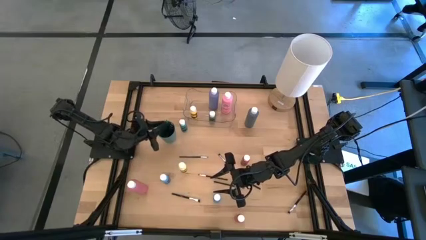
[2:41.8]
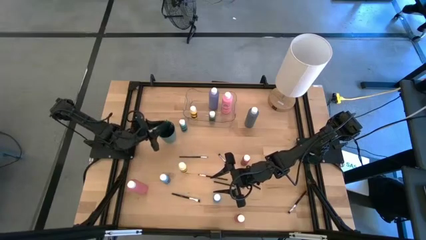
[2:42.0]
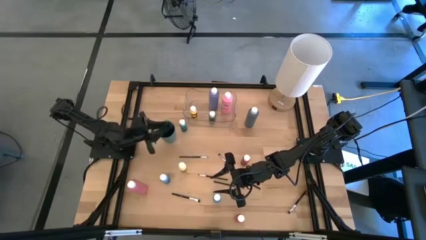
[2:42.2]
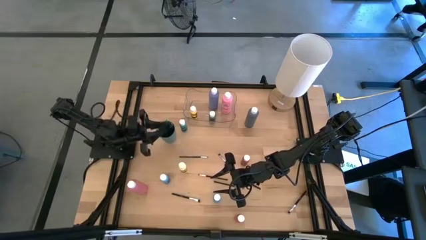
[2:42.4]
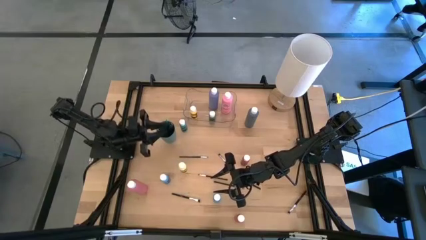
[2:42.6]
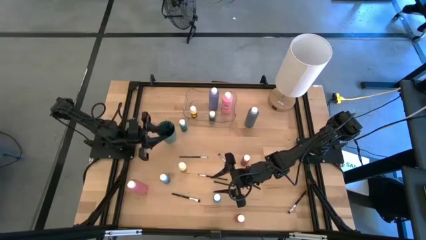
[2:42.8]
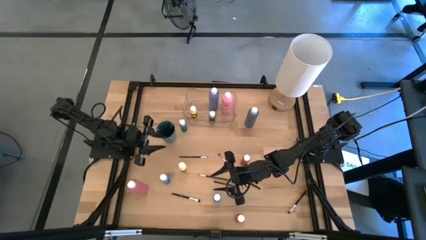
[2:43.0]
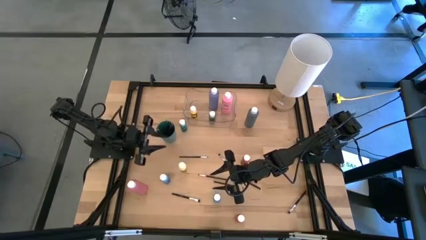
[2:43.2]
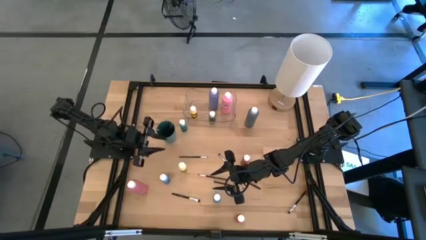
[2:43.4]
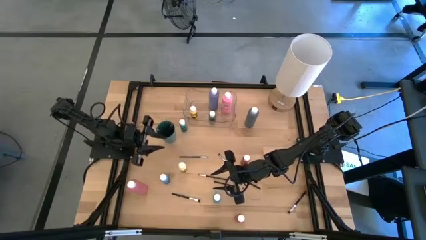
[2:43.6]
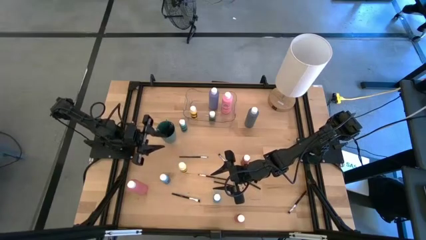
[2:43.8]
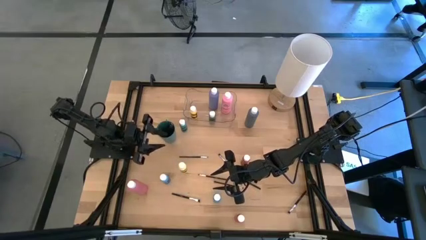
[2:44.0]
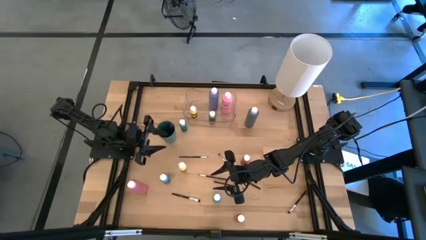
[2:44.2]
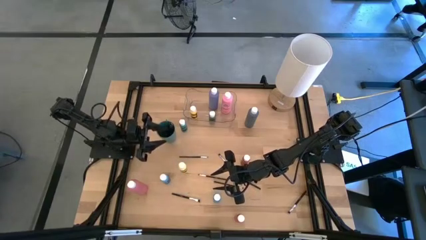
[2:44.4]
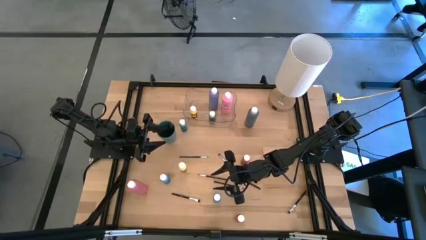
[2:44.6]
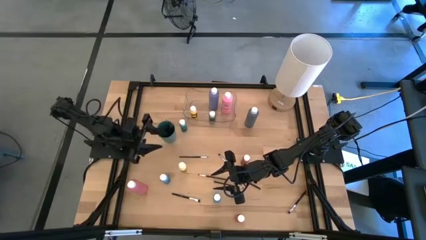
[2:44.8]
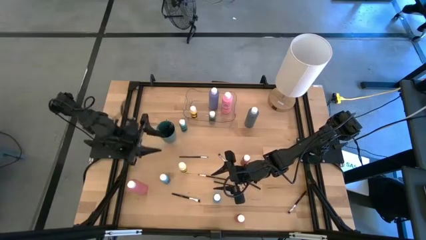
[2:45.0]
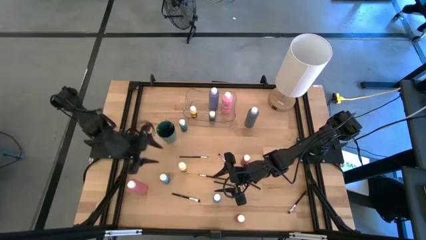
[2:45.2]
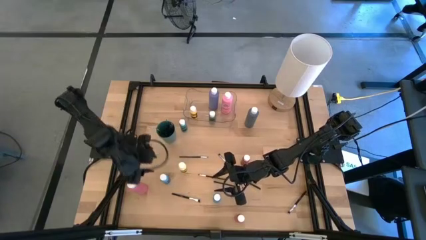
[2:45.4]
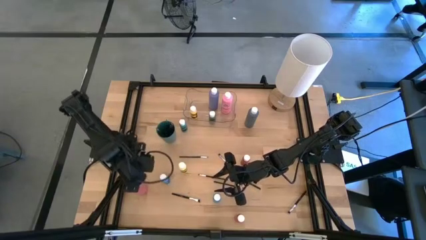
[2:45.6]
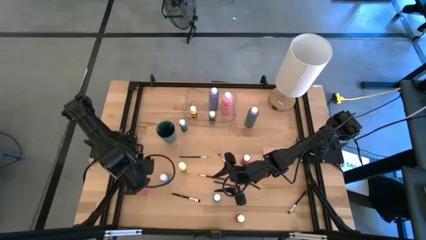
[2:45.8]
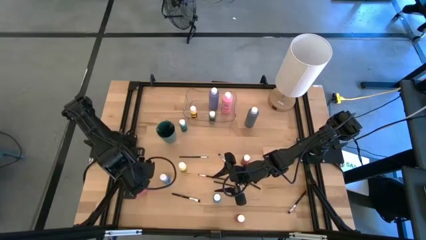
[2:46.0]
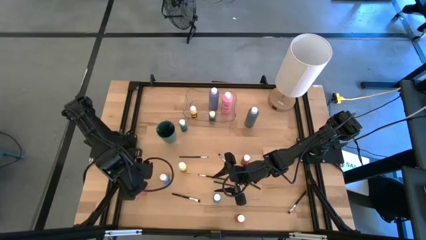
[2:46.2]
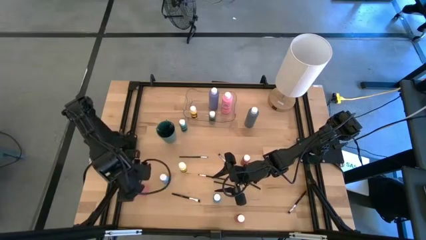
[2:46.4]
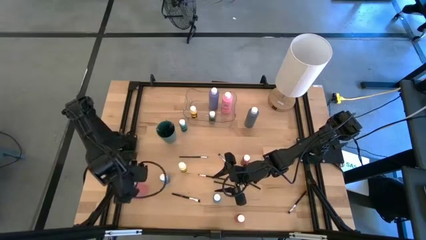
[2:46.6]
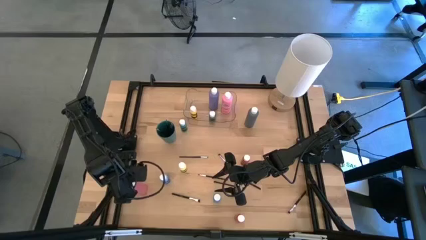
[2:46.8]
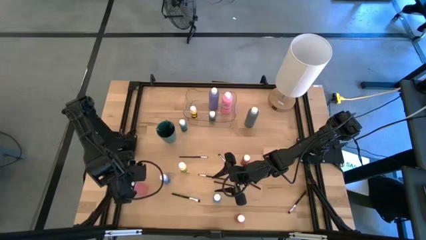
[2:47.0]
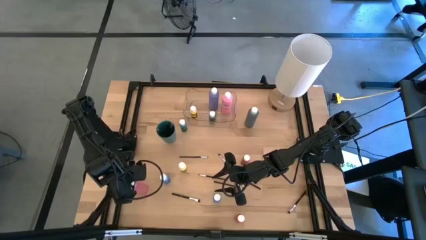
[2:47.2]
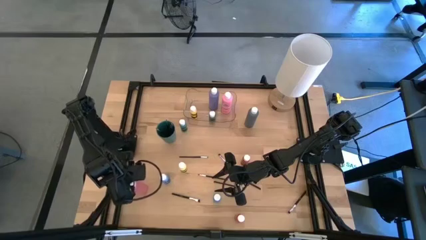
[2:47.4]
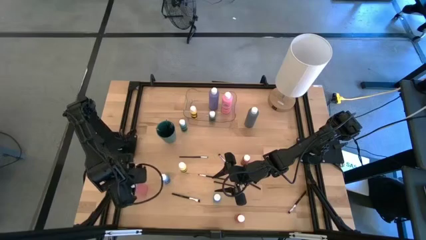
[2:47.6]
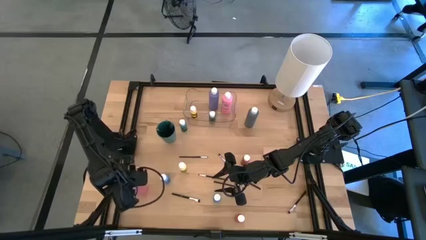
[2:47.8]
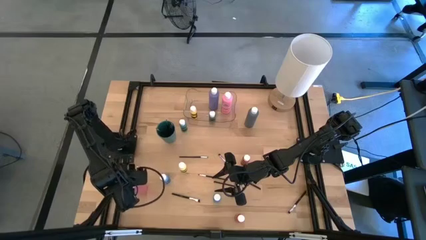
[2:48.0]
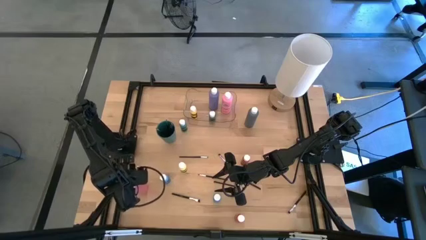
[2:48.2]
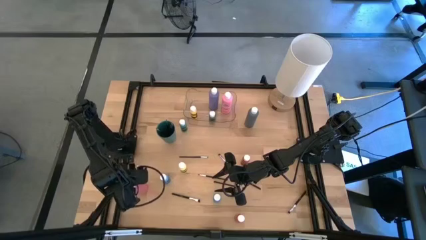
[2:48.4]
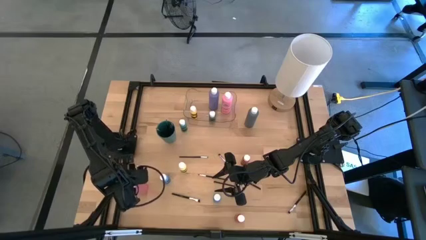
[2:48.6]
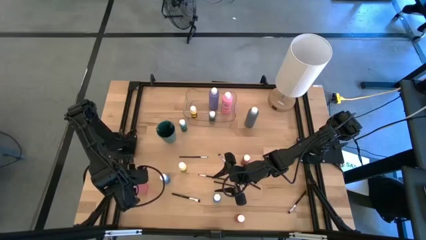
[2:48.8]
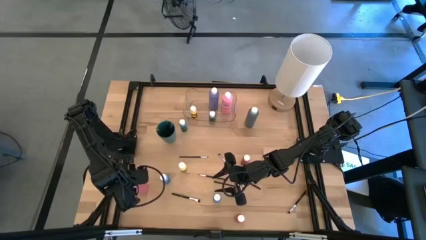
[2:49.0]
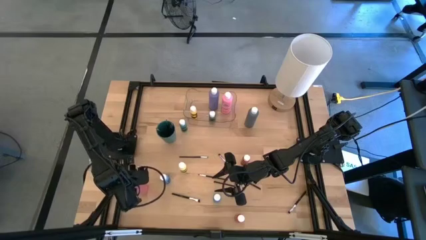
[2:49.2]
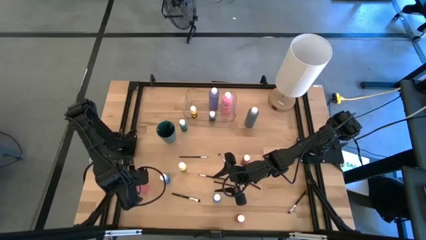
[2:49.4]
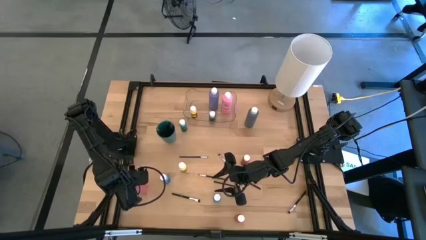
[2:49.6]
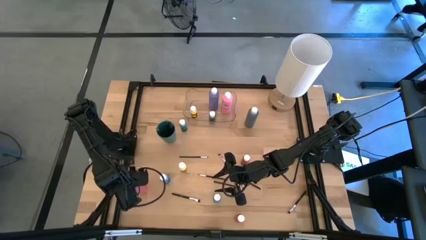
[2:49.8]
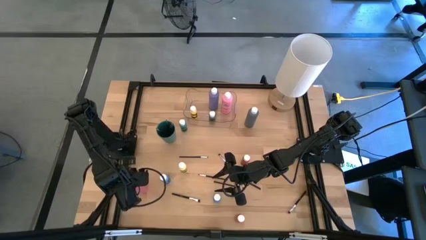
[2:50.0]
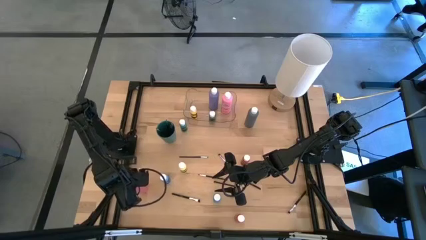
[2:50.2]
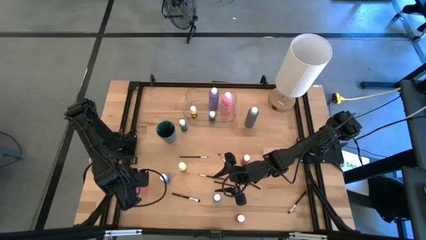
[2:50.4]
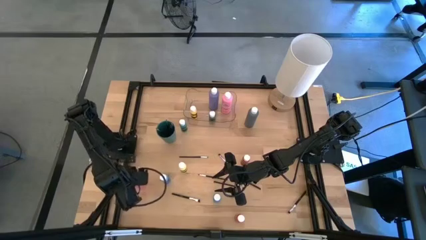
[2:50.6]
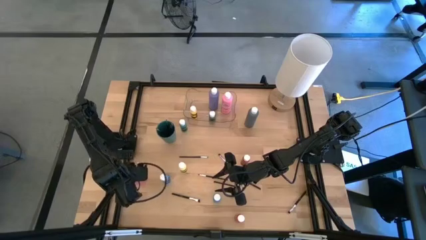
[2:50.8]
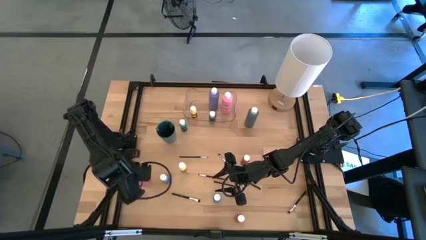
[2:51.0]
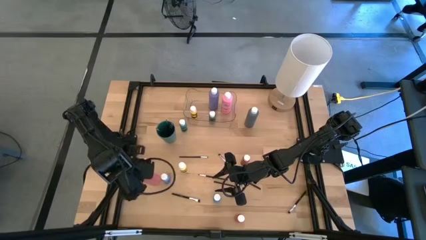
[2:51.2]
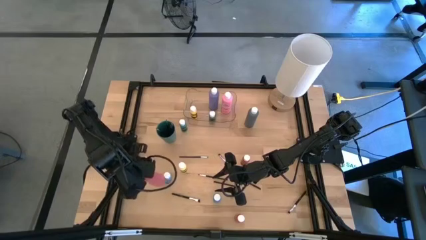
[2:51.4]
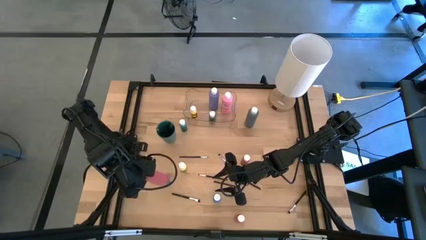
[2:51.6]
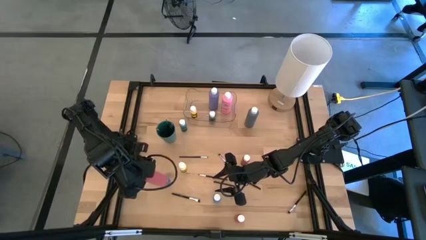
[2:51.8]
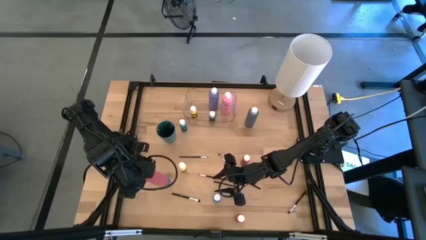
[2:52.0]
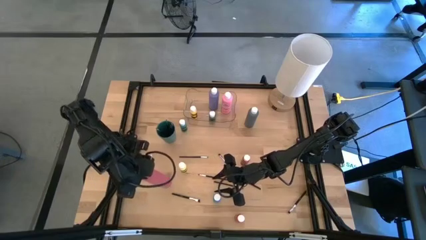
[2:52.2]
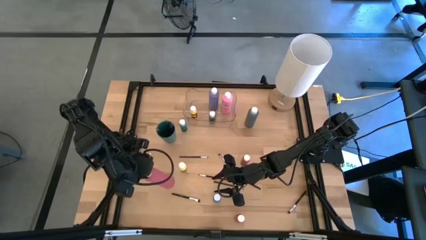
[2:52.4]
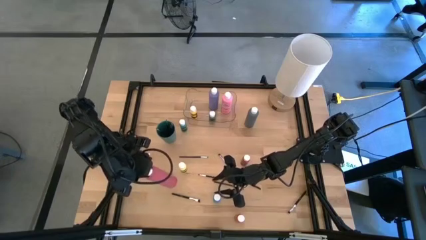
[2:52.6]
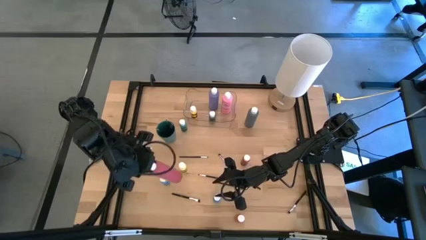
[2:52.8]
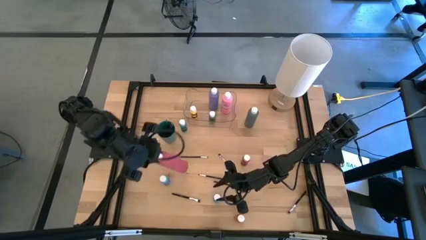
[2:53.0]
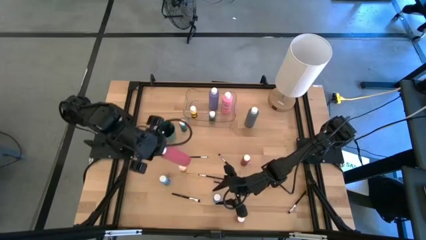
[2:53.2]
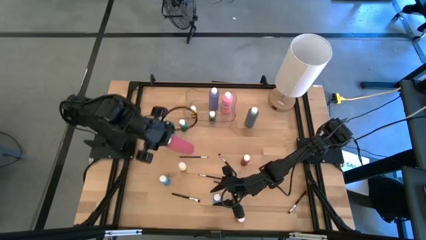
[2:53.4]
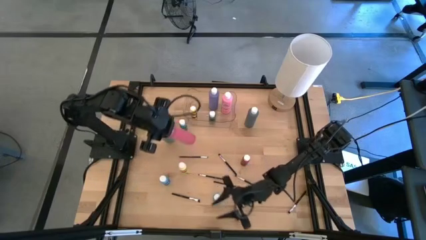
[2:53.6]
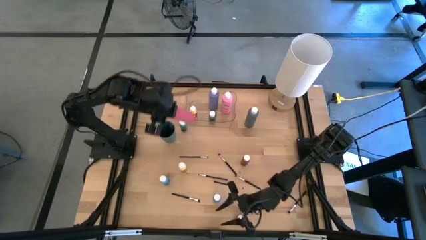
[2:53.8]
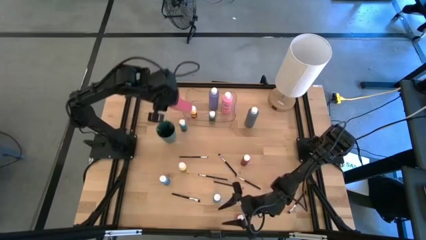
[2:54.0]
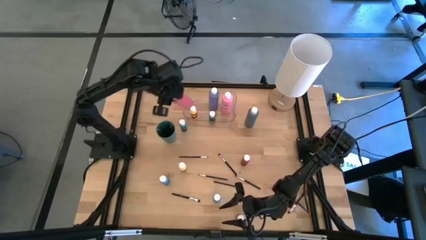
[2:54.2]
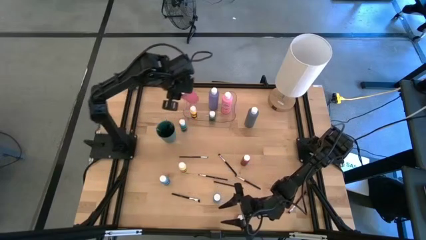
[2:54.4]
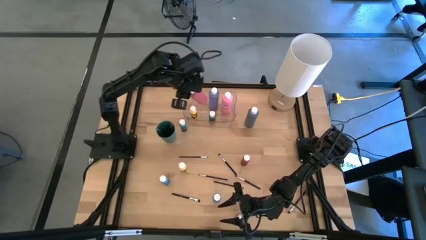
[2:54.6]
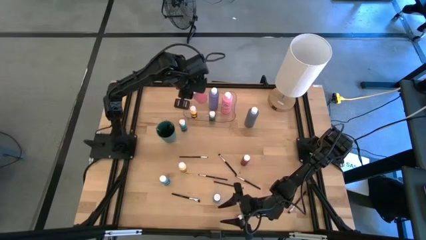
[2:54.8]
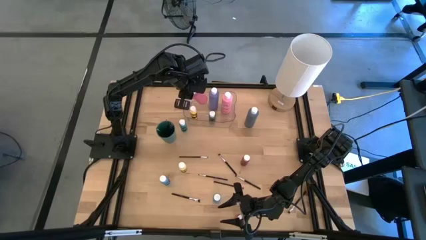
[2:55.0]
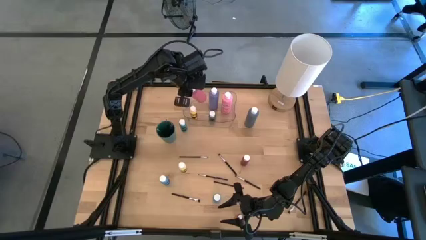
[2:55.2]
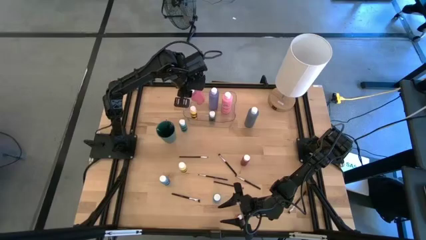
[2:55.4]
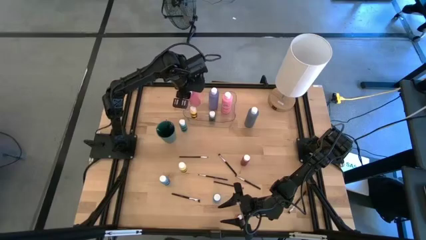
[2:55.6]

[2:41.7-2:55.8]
Task: Pick & Place Paint Supplies
Put the pink paint bottle into the transparent bin

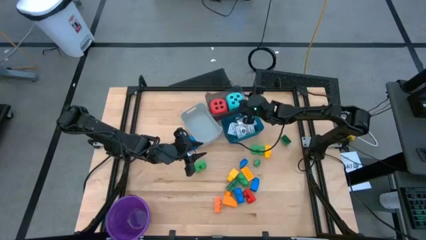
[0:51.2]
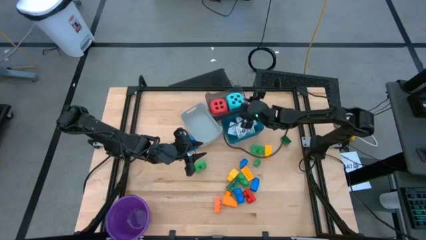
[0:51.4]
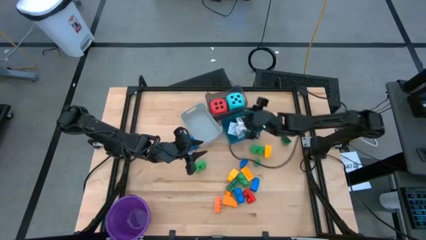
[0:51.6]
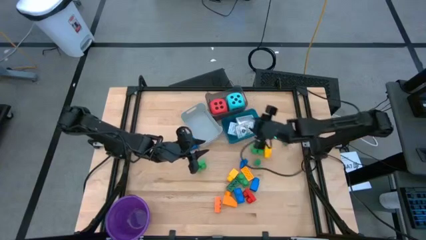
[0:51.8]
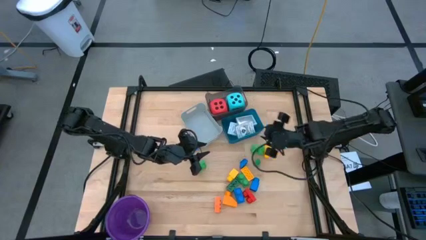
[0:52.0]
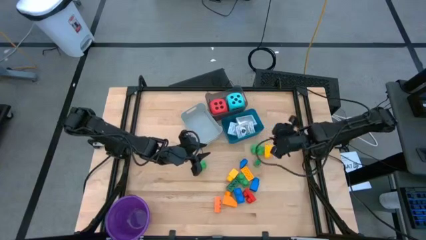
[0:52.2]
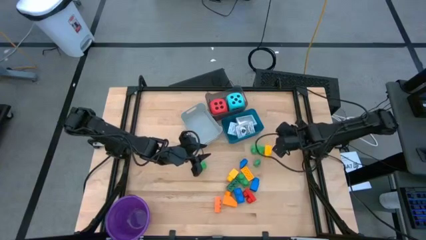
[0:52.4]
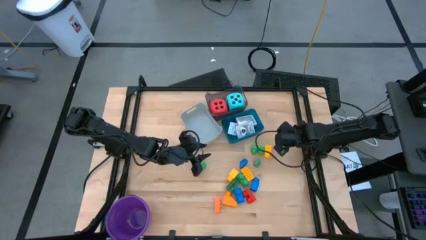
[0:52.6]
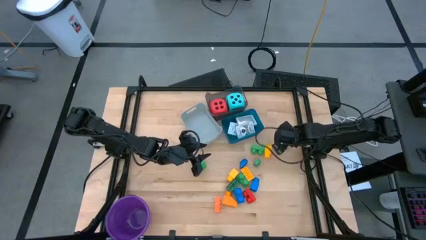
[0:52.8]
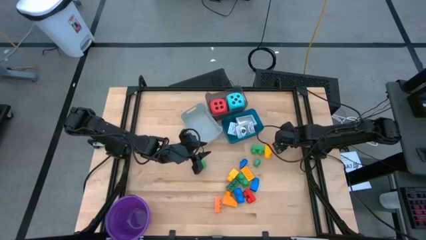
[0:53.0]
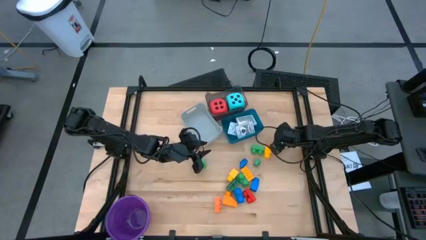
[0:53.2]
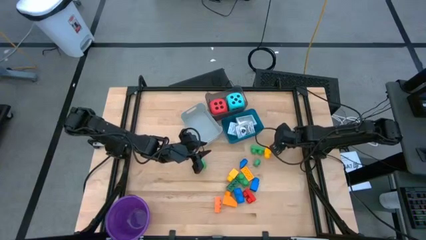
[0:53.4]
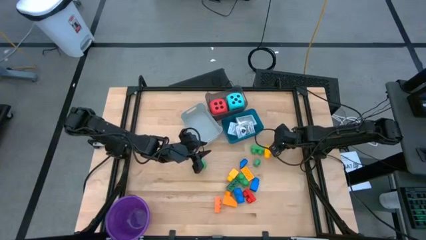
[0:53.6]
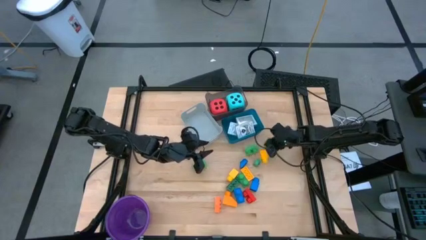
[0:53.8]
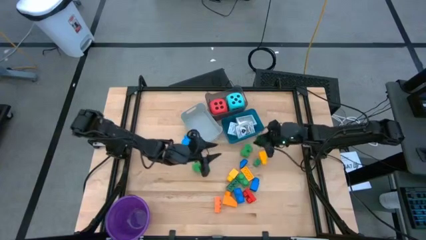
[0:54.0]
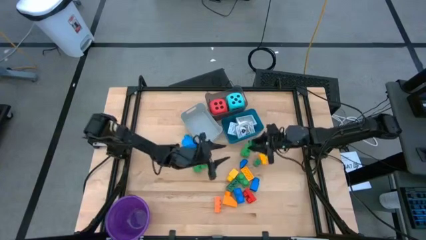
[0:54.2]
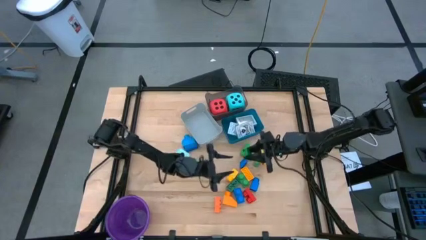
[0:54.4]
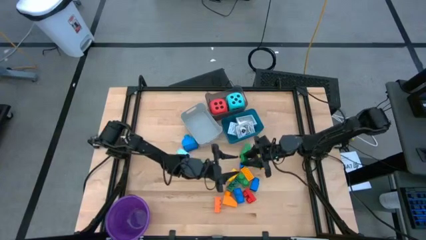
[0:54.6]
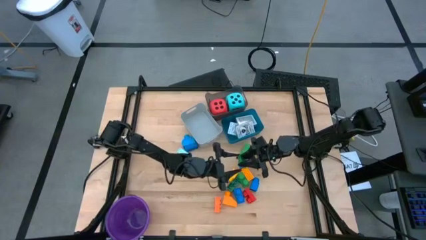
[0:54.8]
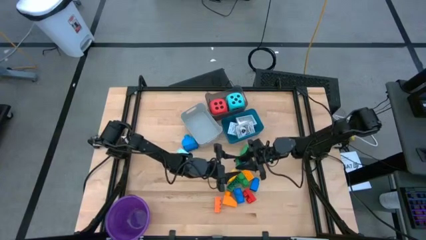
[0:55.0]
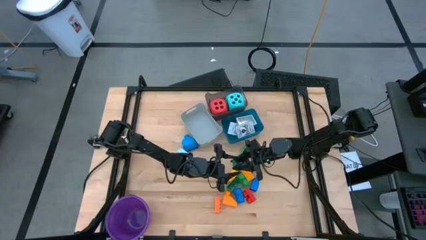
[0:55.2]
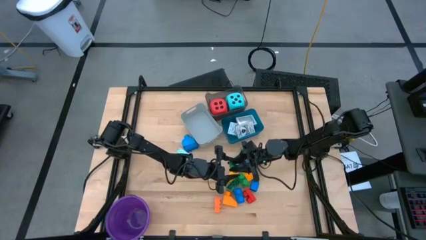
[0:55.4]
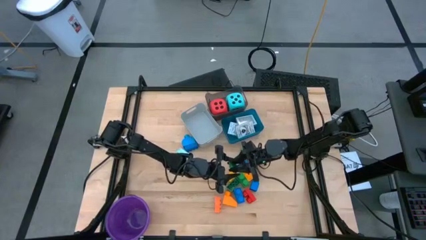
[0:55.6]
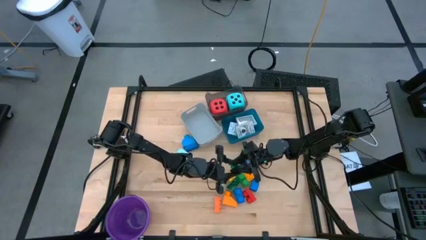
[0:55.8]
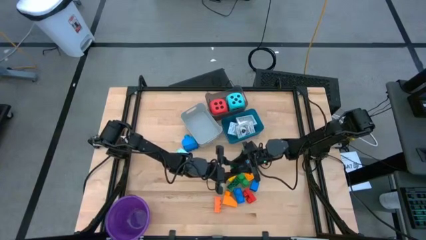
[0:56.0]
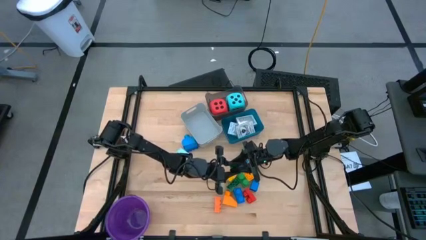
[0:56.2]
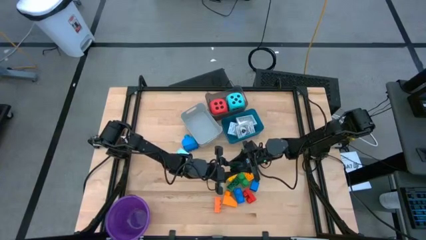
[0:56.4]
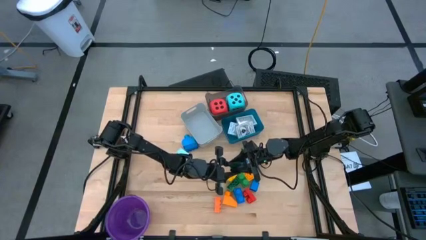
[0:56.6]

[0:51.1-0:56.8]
Task: Pick & Place Toys
Put the green game piece into the gray bin
